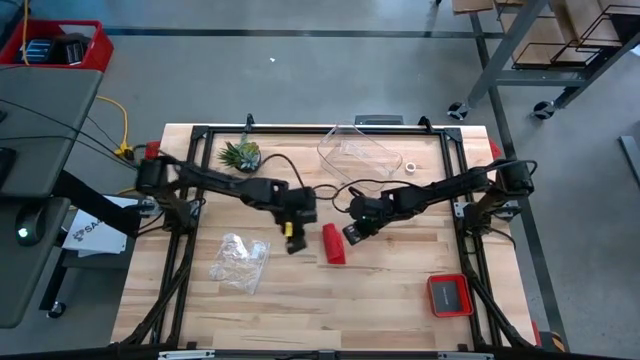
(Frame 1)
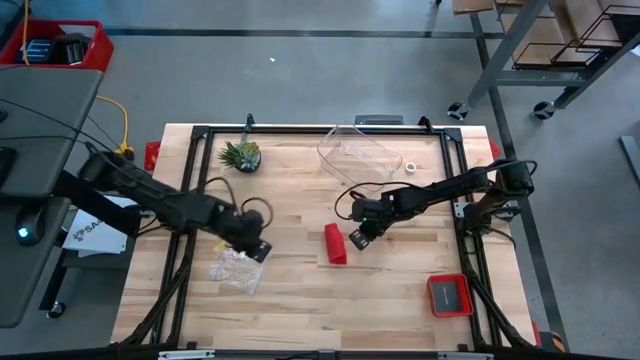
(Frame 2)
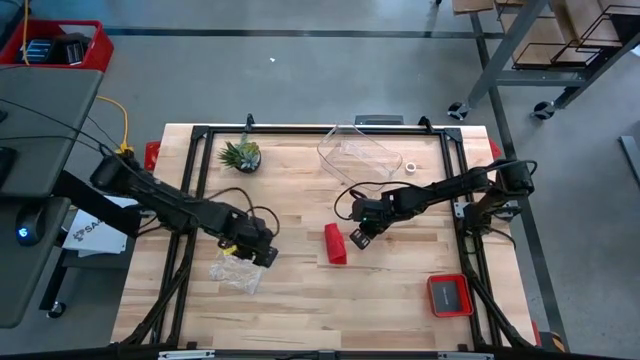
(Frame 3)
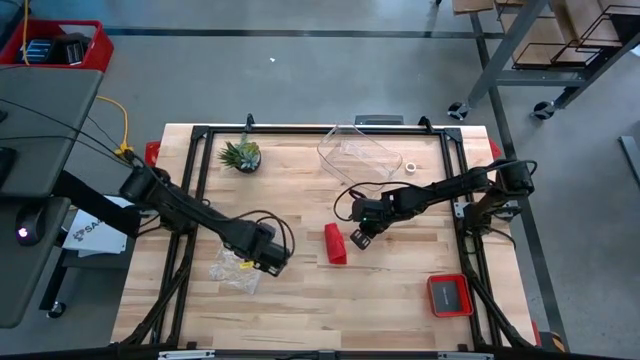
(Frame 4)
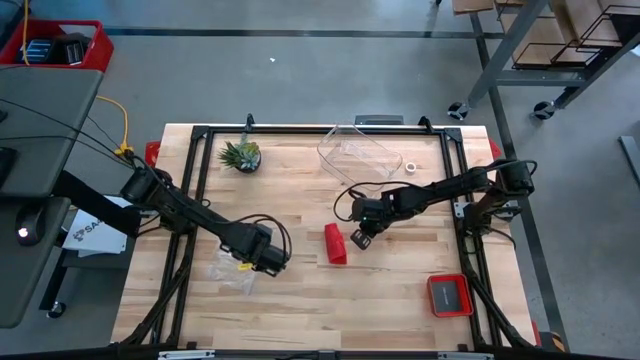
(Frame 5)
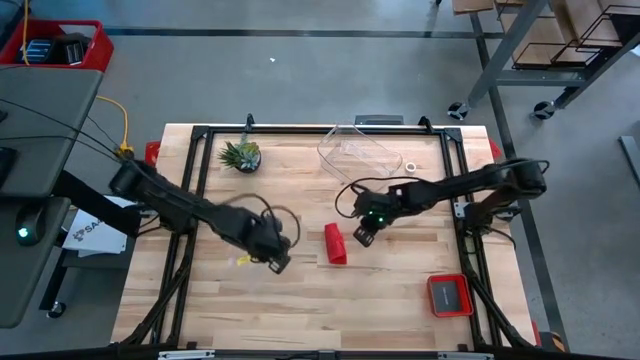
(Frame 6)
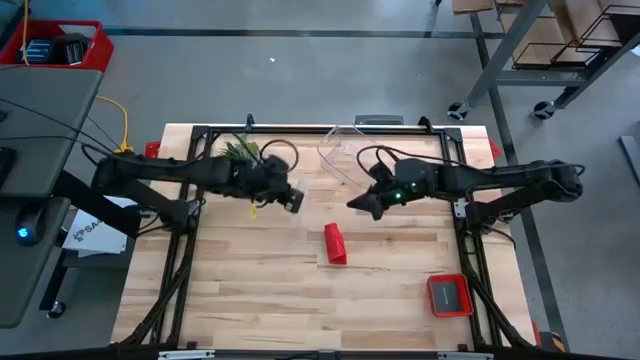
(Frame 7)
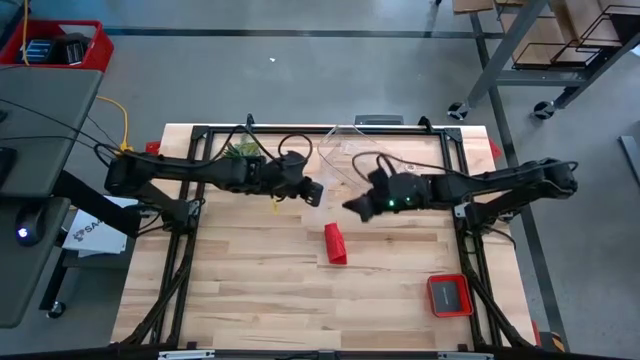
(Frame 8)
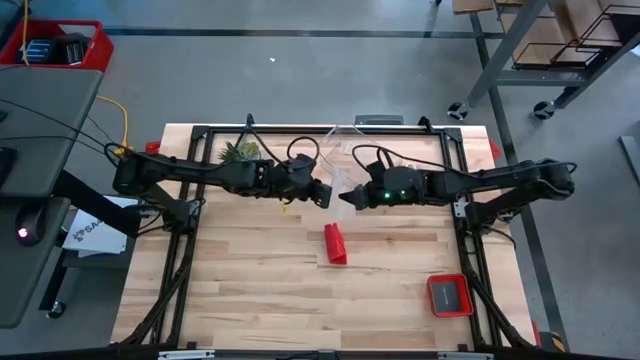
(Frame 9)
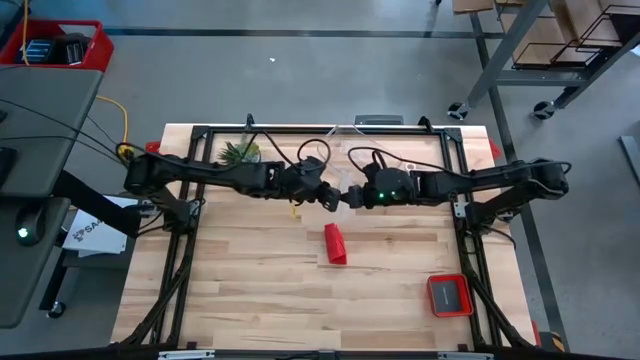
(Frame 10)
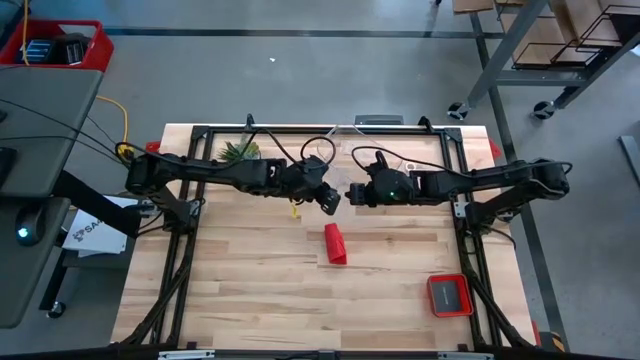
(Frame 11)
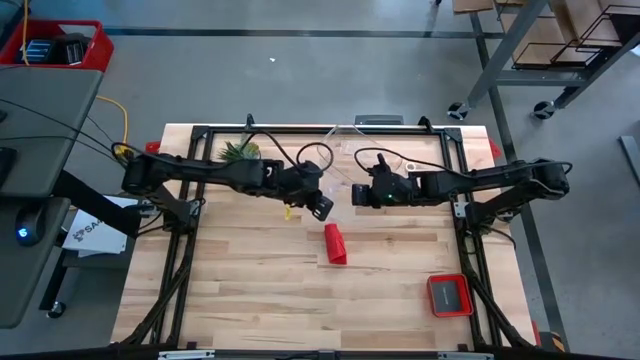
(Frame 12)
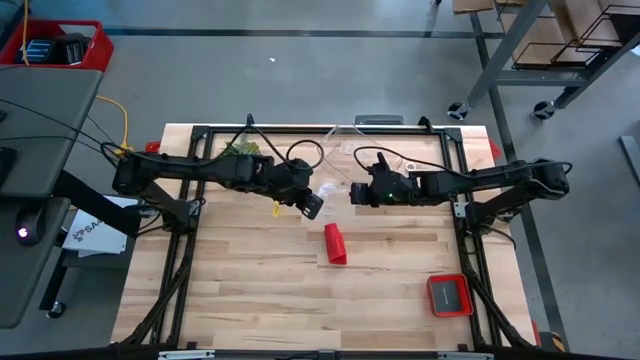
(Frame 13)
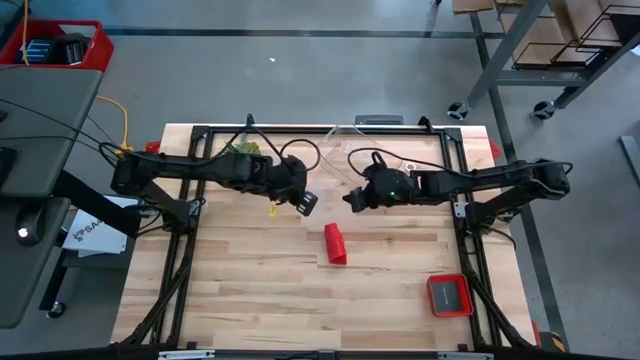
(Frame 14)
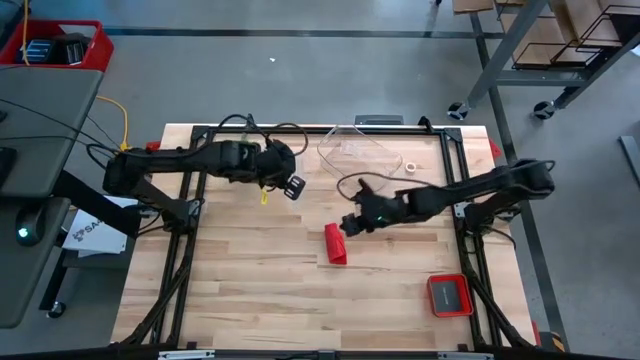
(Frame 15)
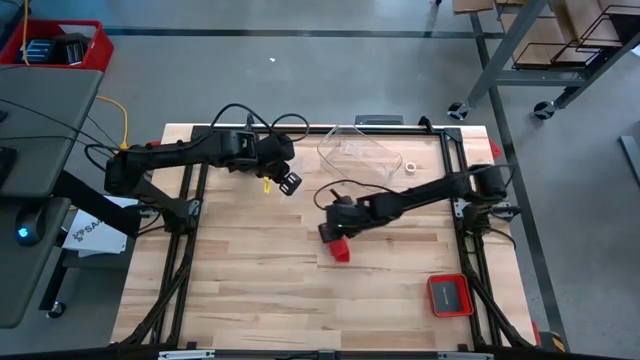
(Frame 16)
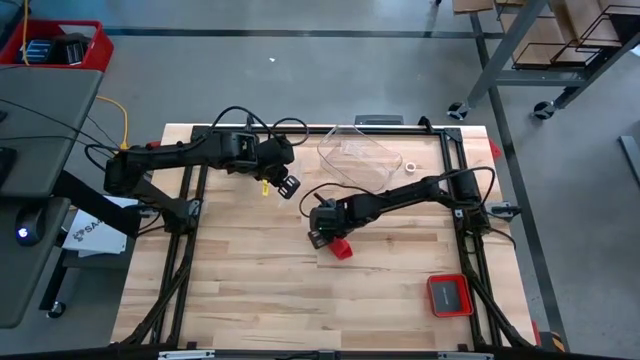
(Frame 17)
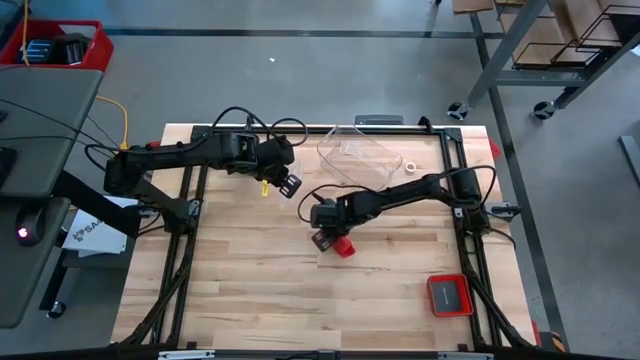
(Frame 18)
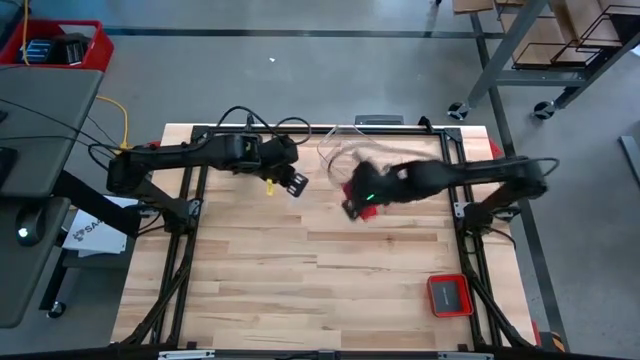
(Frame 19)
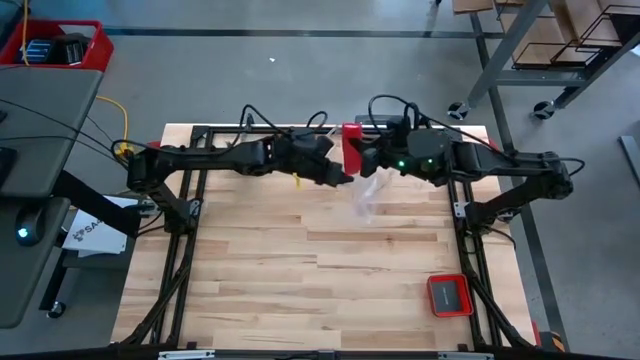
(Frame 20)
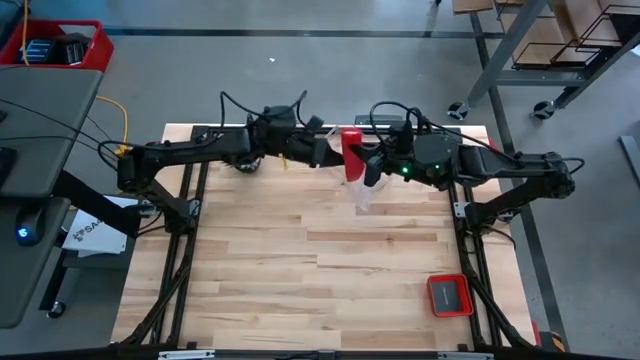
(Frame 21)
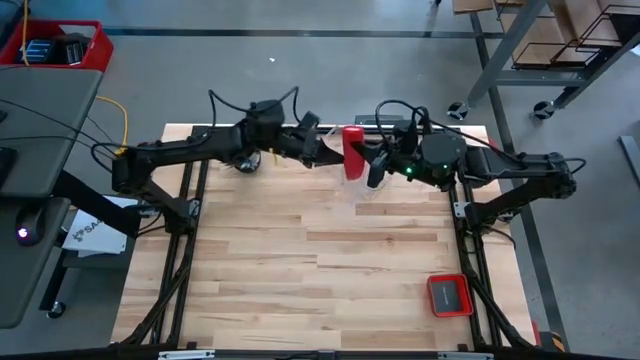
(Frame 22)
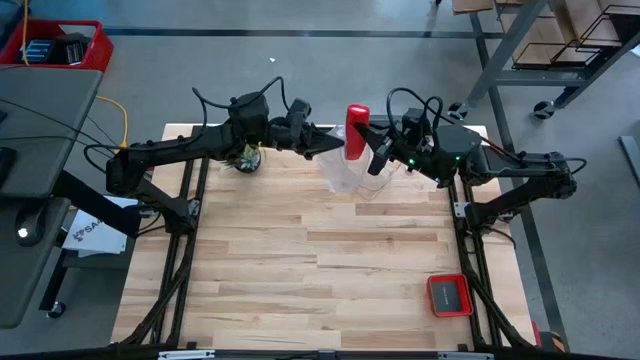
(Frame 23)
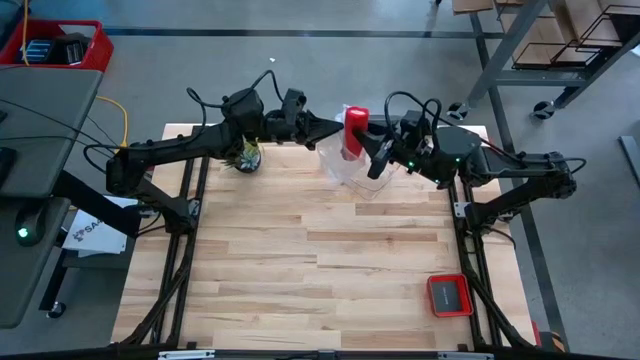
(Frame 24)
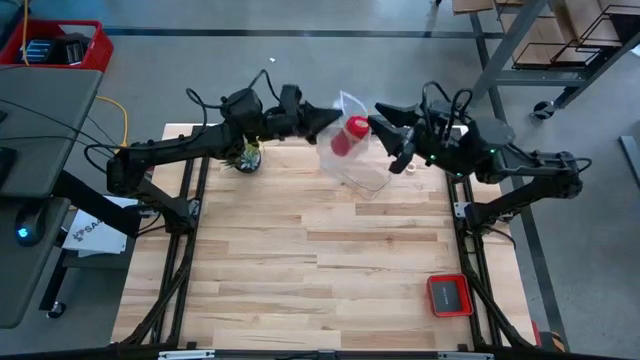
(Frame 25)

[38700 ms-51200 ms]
Task: Roll bandage
Put the red rolled bandage into the transparent zip bag

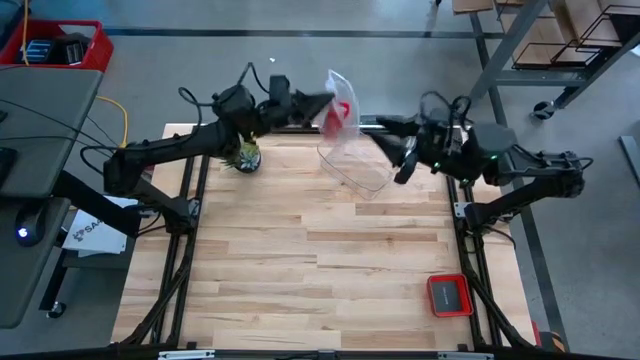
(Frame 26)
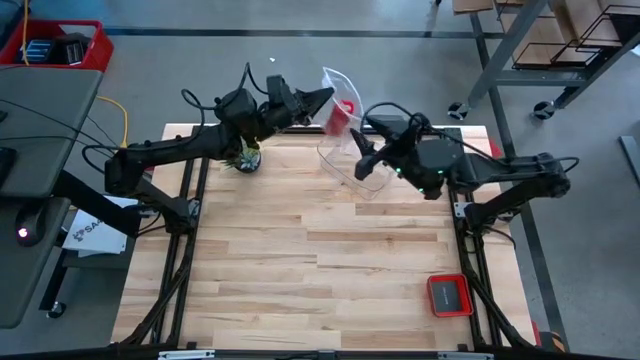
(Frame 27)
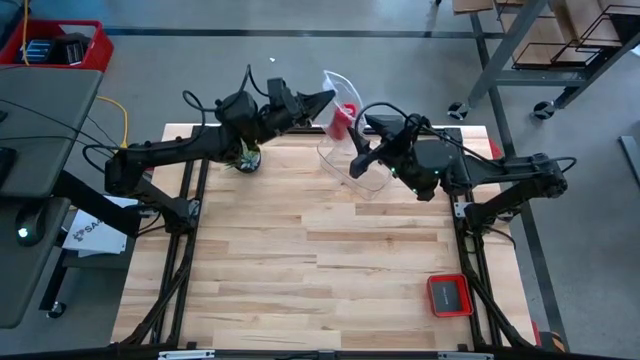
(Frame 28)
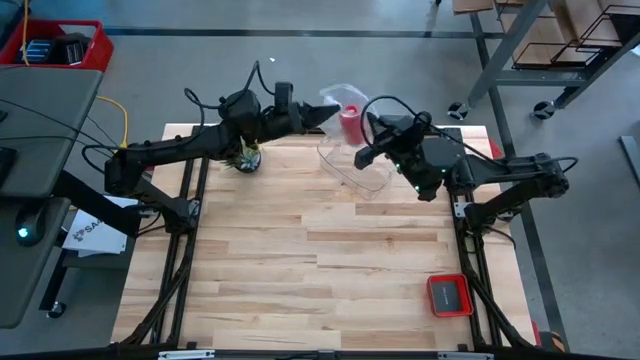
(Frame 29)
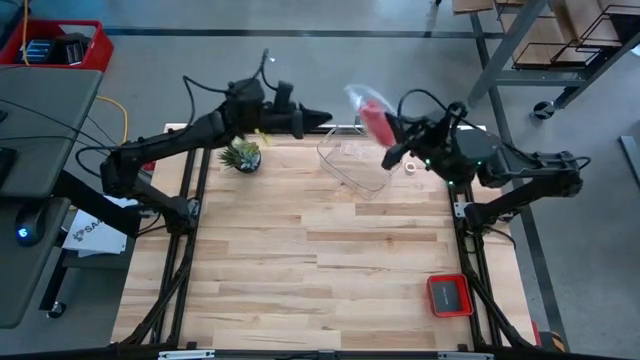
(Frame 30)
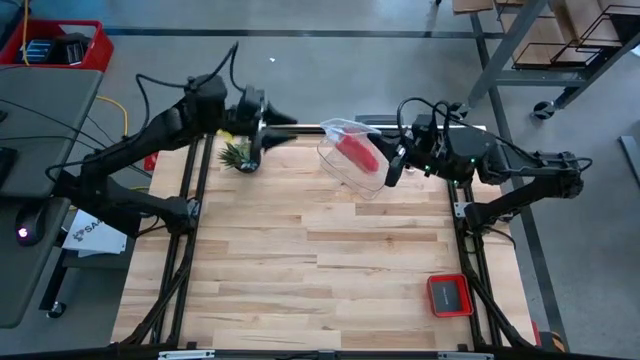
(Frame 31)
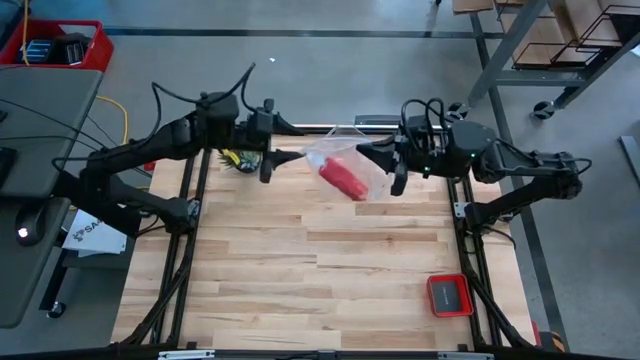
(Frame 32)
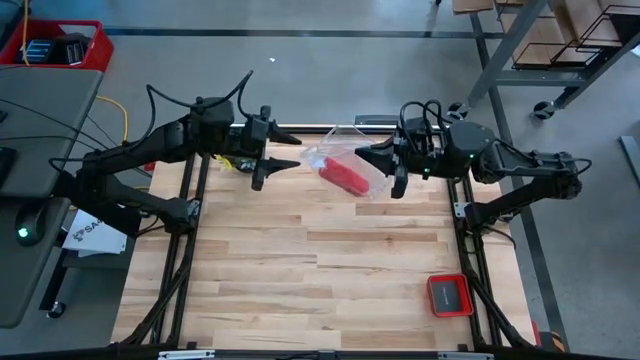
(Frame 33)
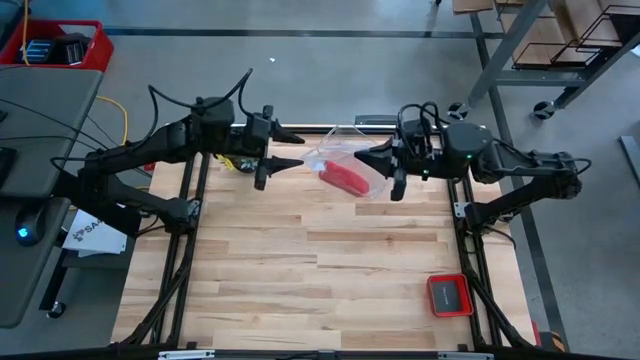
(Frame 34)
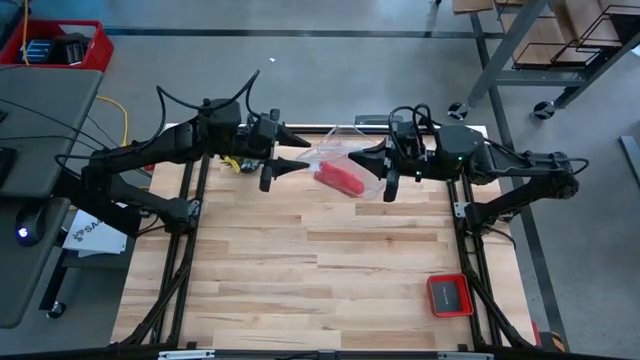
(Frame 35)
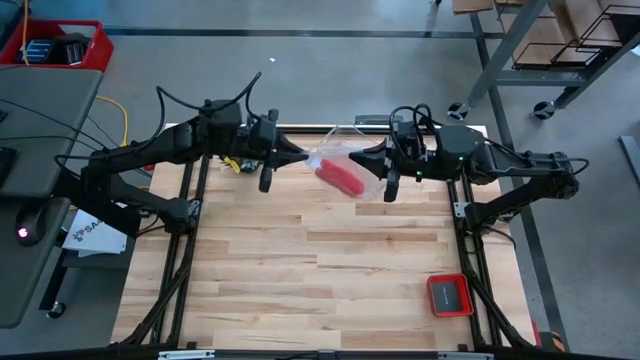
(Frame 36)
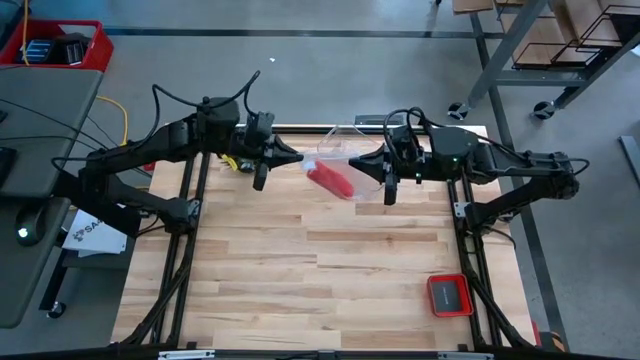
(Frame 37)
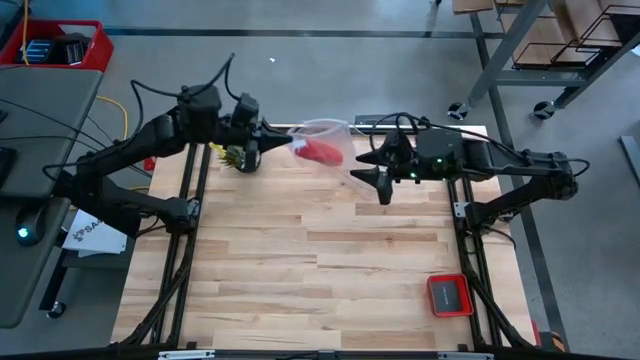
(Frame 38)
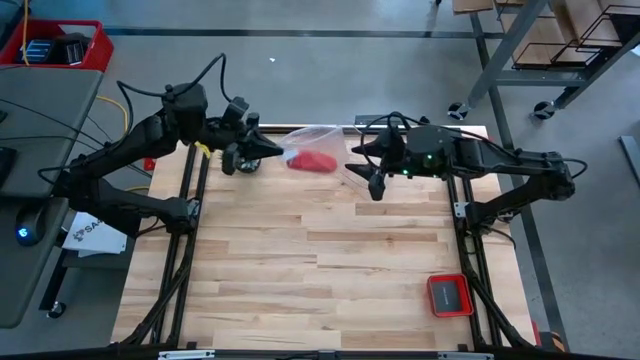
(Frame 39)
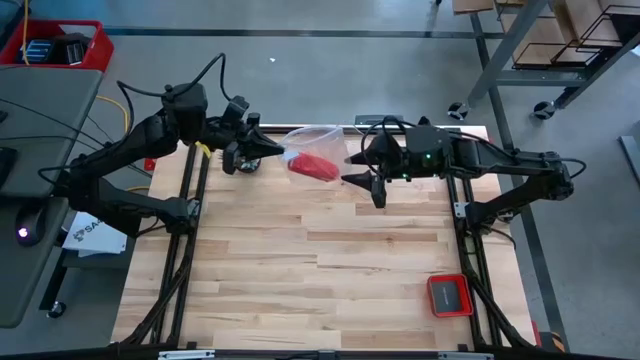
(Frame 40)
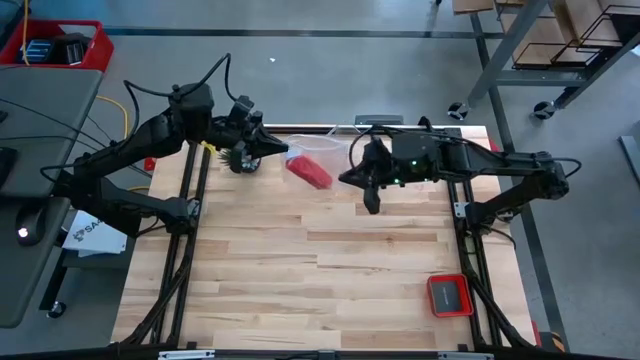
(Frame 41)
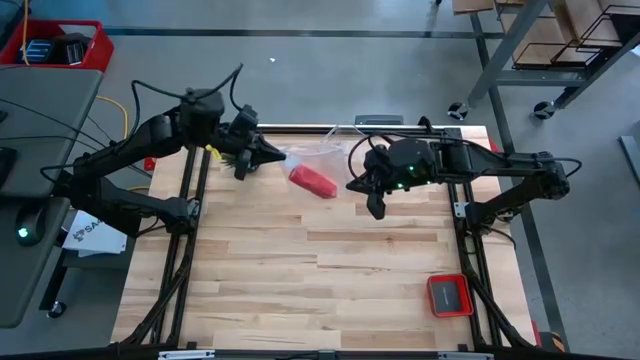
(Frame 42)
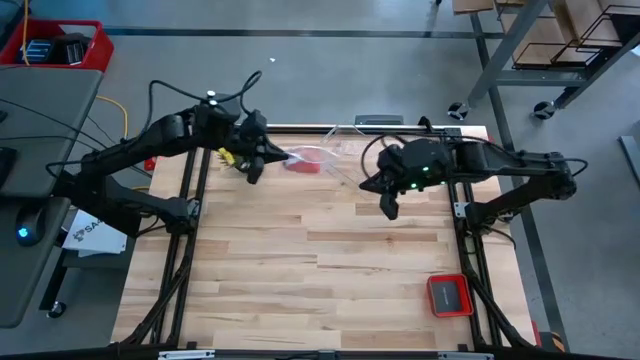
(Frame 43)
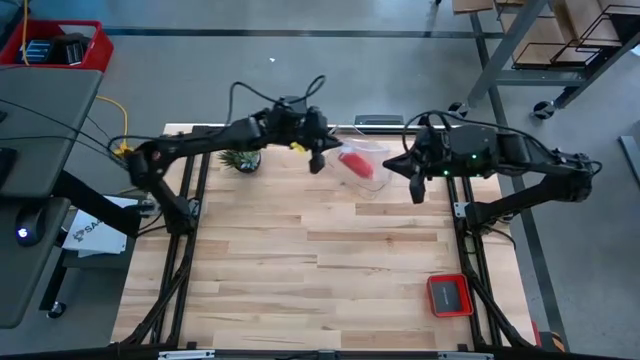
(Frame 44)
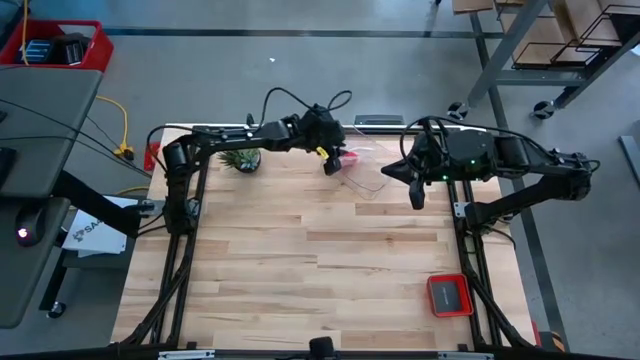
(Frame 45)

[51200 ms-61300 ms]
Put the transparent zip bag into the transparent bin
